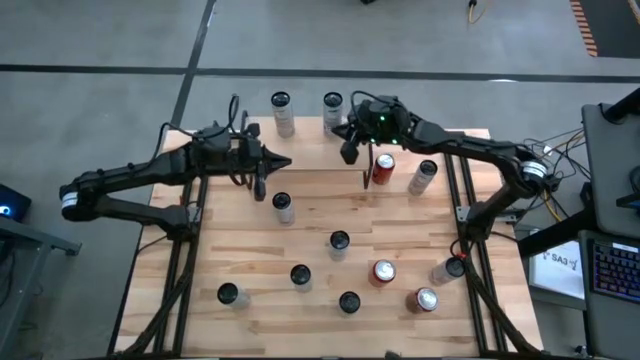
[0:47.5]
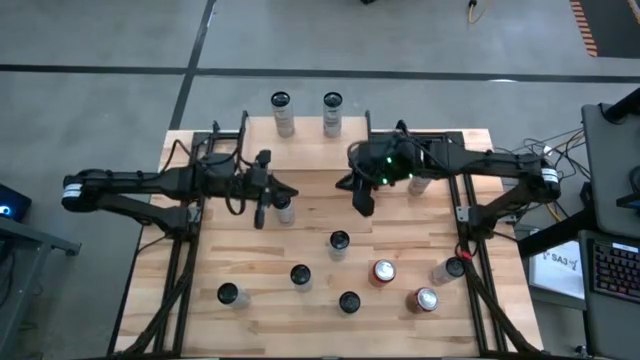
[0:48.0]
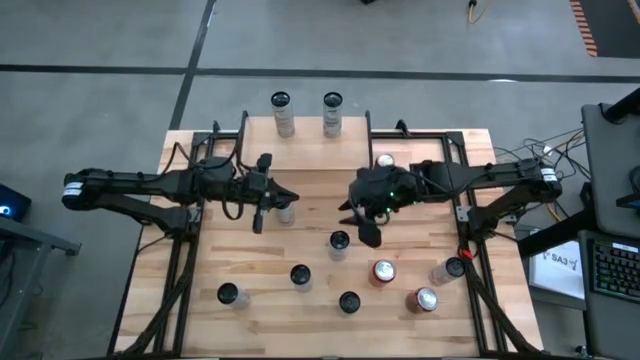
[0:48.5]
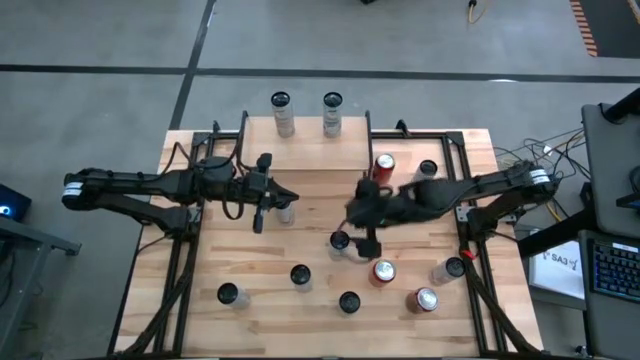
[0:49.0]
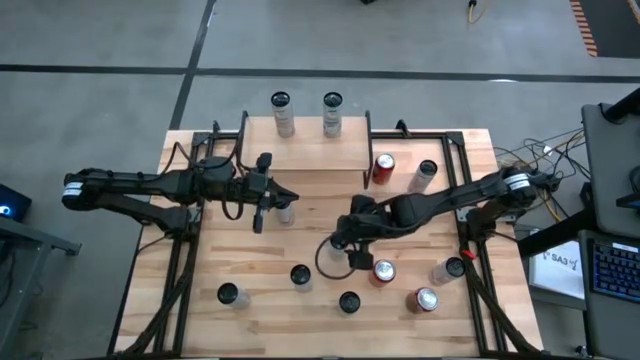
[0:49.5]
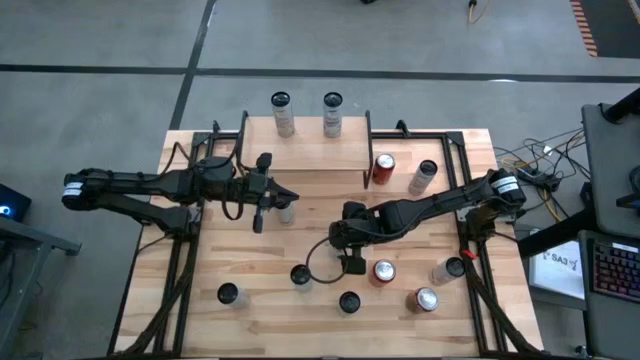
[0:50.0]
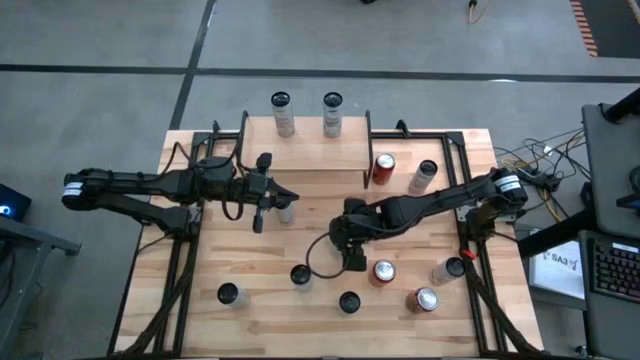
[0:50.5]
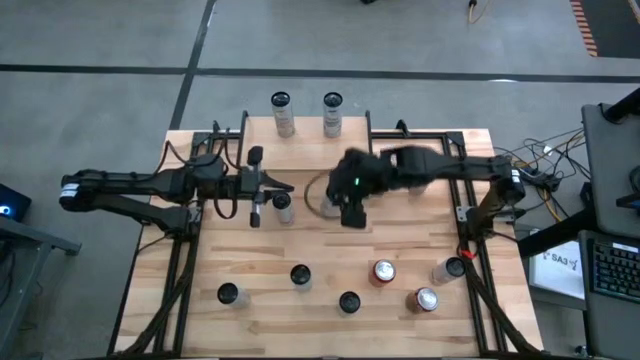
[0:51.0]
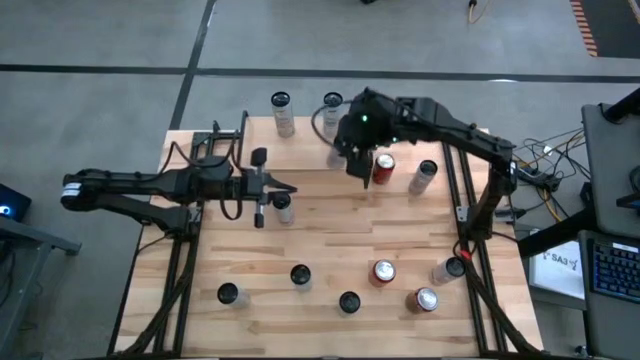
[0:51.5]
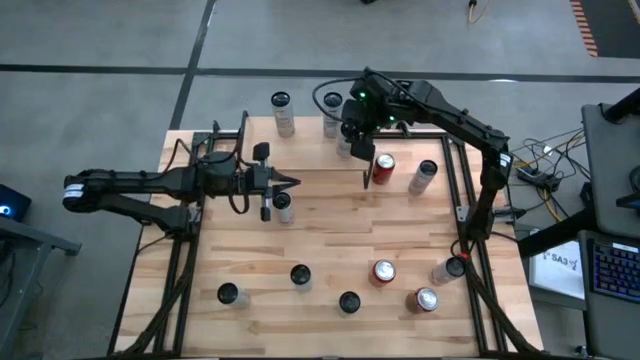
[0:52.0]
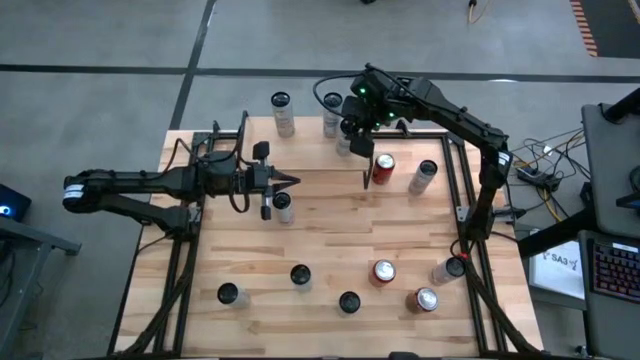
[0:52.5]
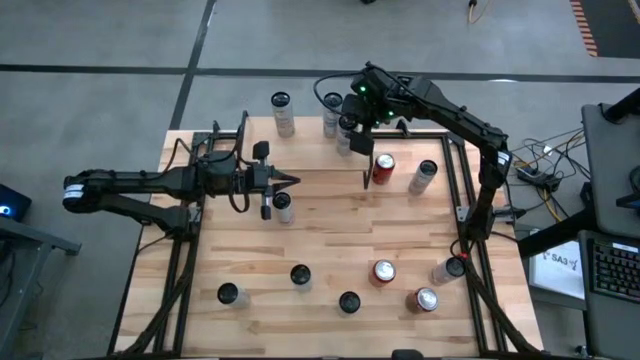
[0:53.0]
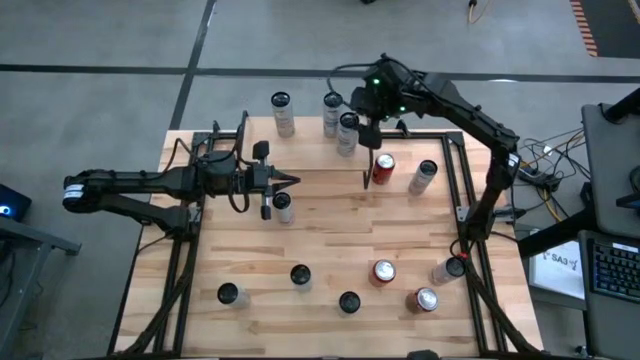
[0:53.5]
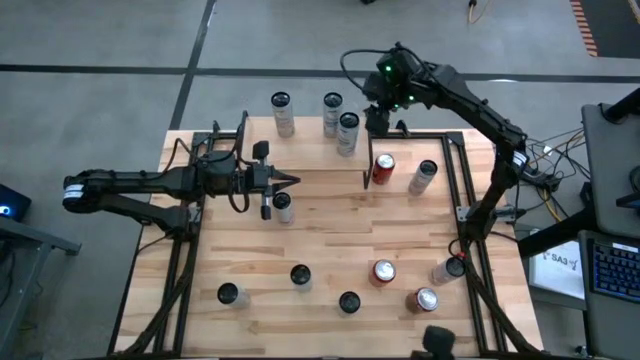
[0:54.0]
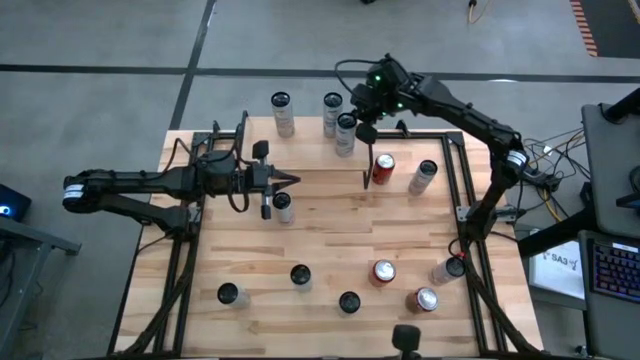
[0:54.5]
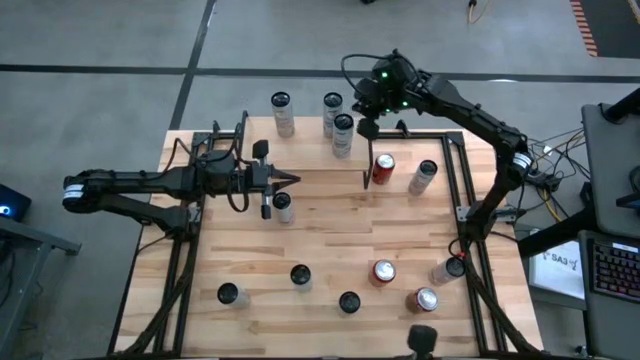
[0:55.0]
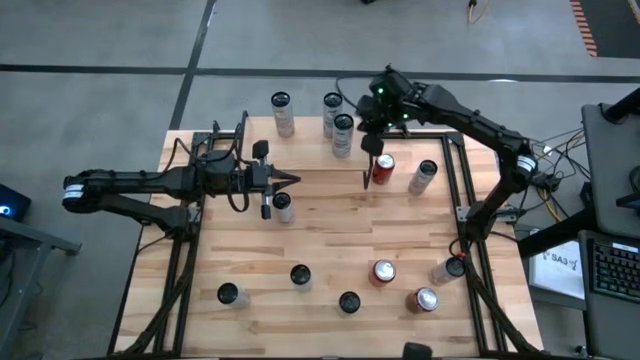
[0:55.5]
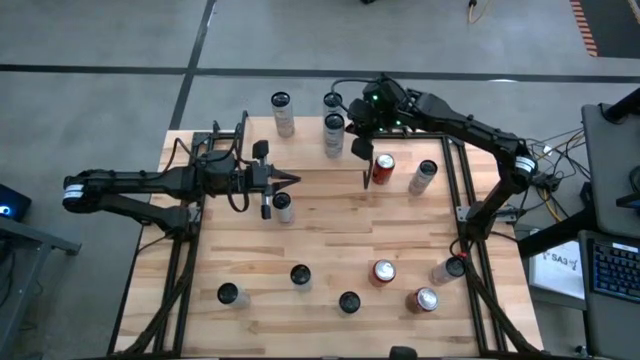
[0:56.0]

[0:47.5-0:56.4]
Task: Place canned beverage on shelf
Put the white soda can aligned with the other white soda can on the shelf

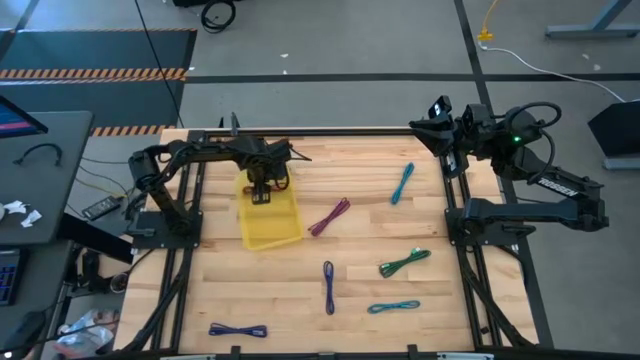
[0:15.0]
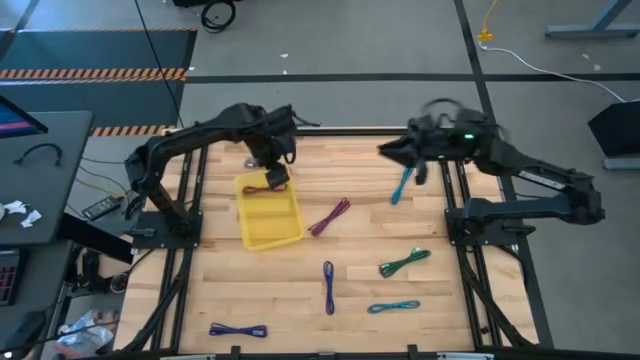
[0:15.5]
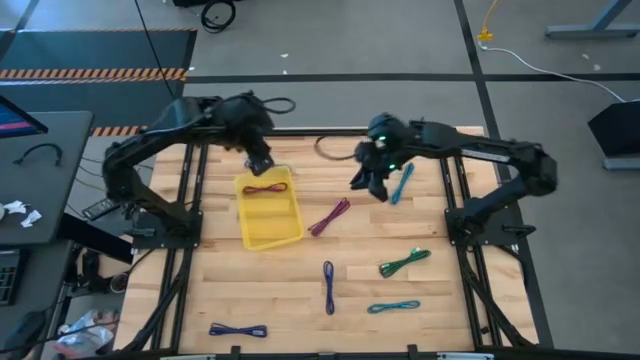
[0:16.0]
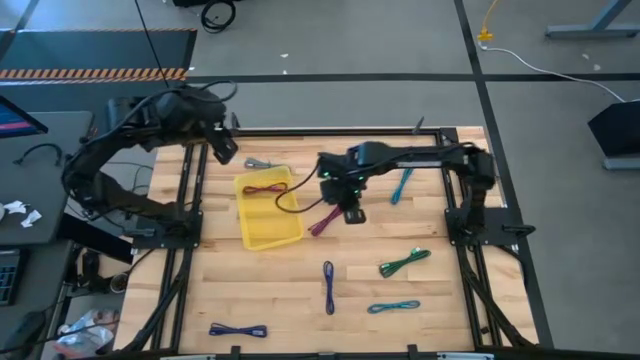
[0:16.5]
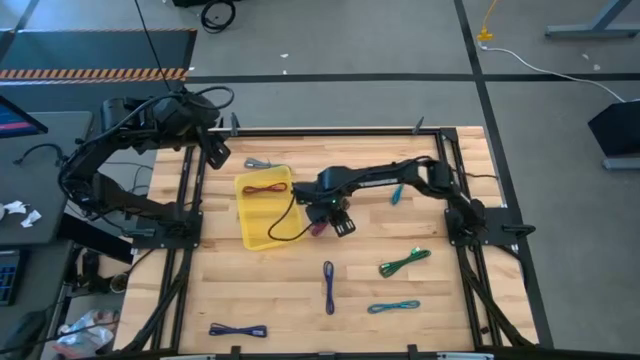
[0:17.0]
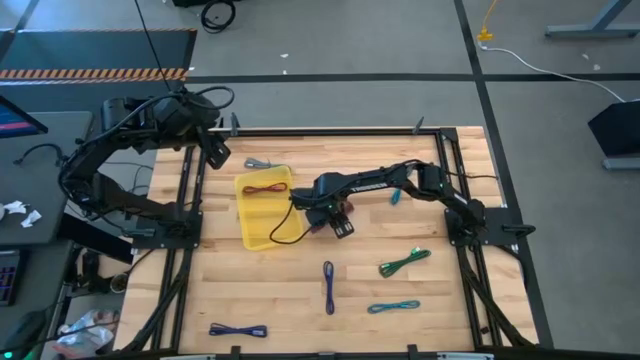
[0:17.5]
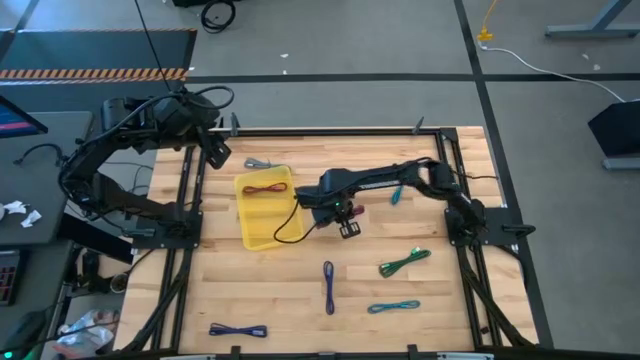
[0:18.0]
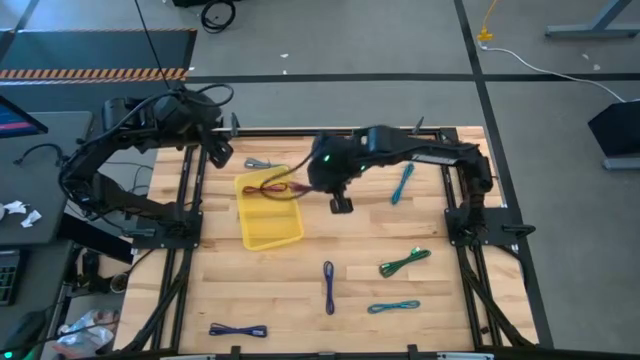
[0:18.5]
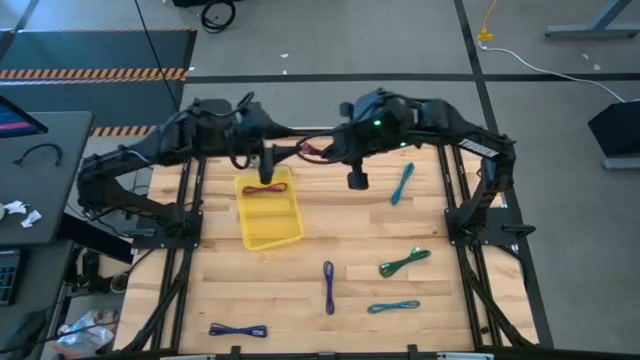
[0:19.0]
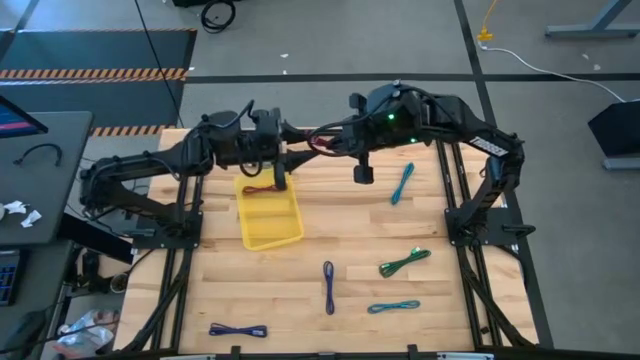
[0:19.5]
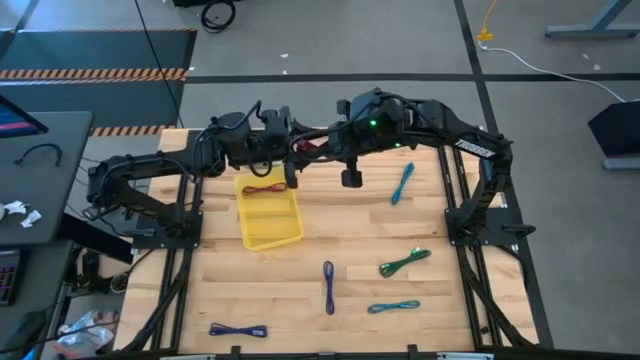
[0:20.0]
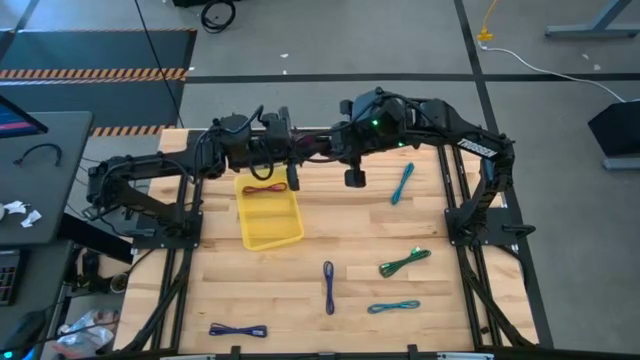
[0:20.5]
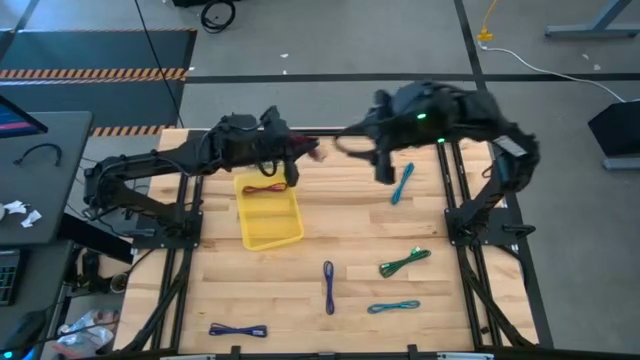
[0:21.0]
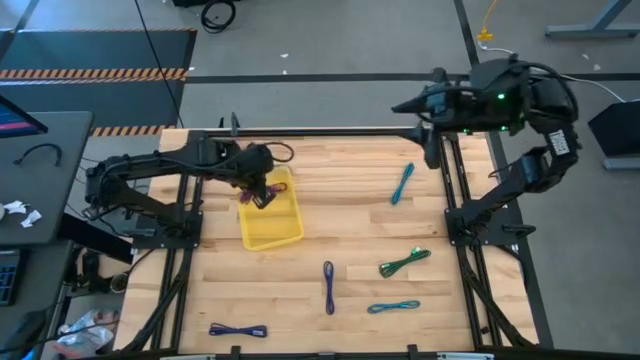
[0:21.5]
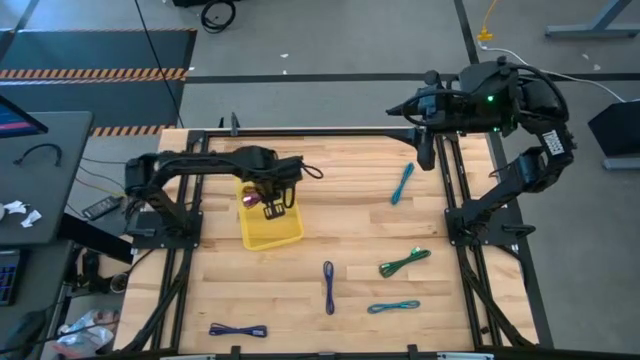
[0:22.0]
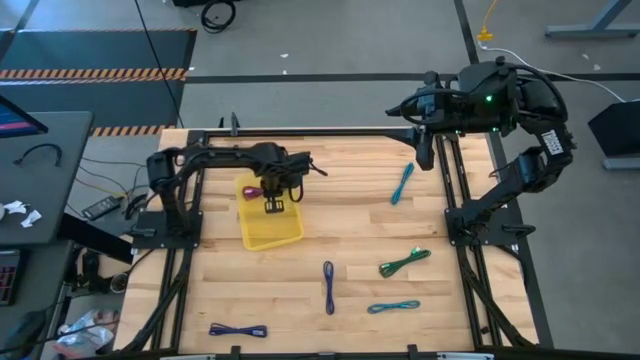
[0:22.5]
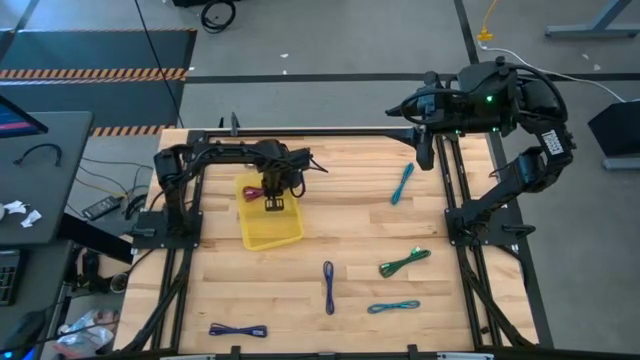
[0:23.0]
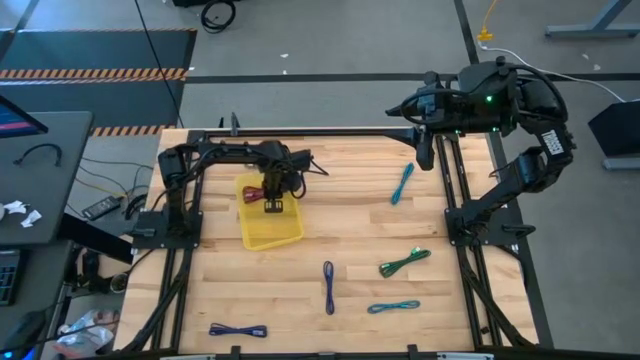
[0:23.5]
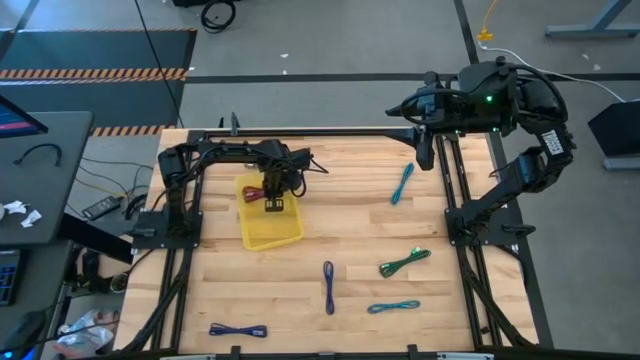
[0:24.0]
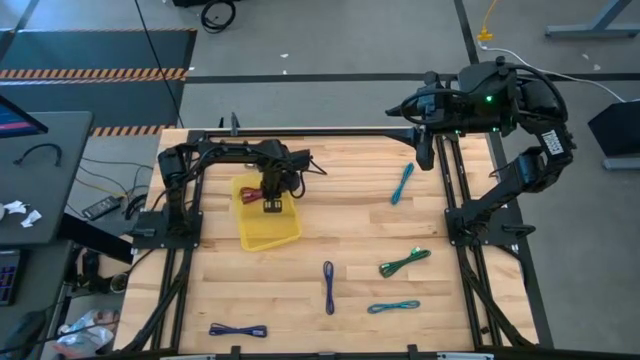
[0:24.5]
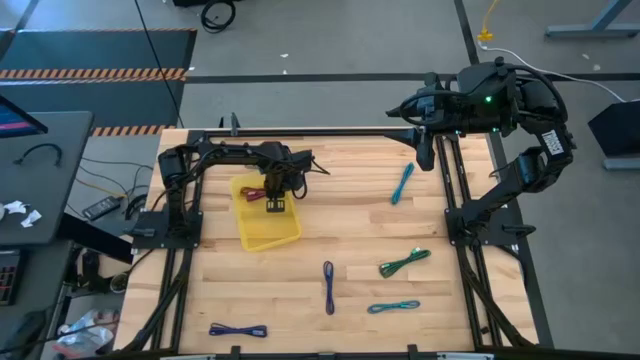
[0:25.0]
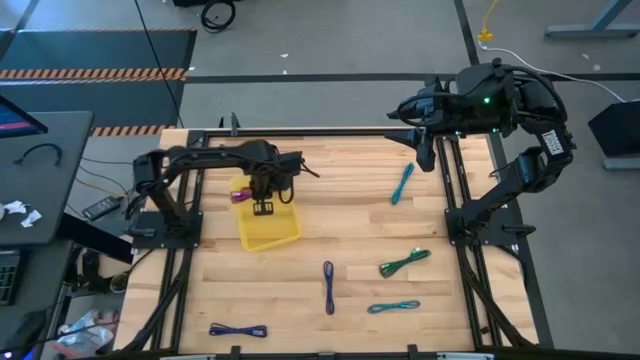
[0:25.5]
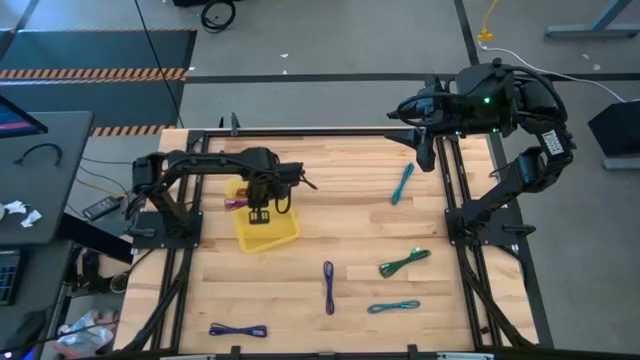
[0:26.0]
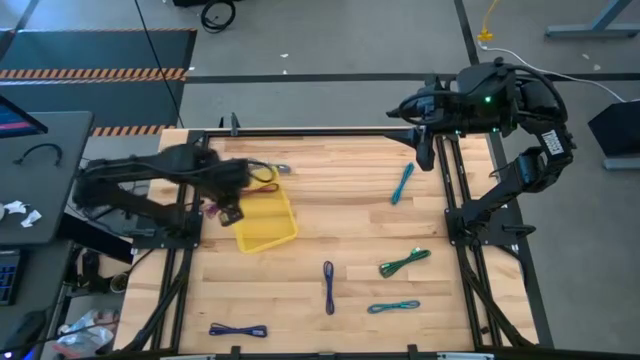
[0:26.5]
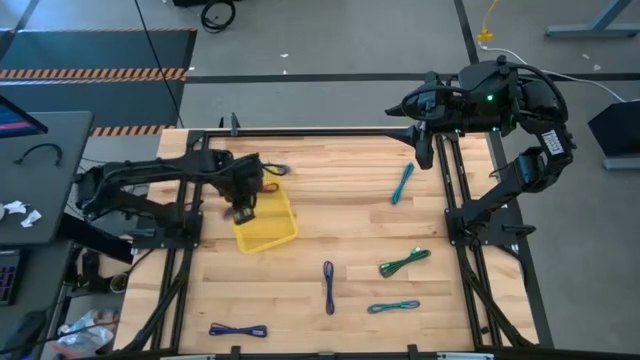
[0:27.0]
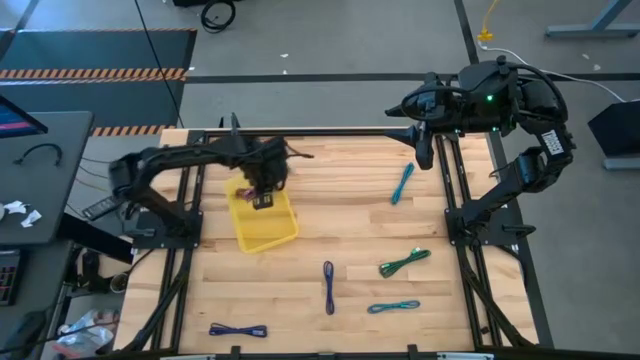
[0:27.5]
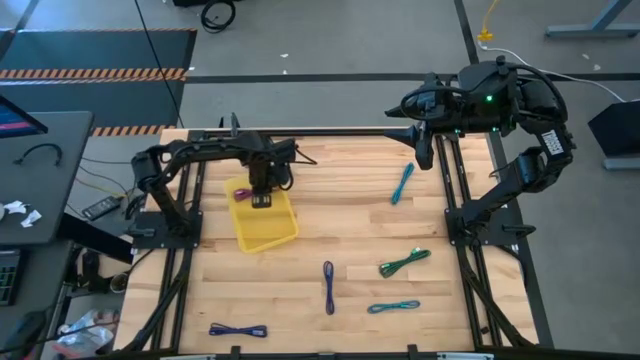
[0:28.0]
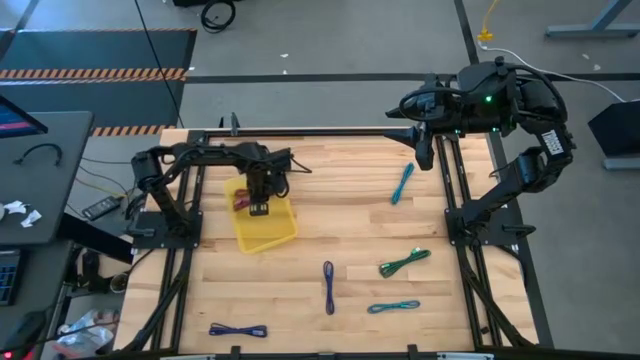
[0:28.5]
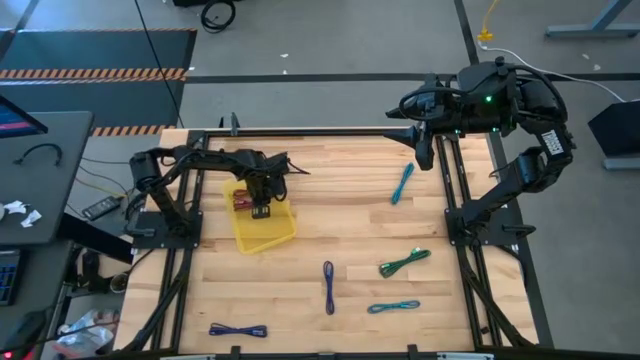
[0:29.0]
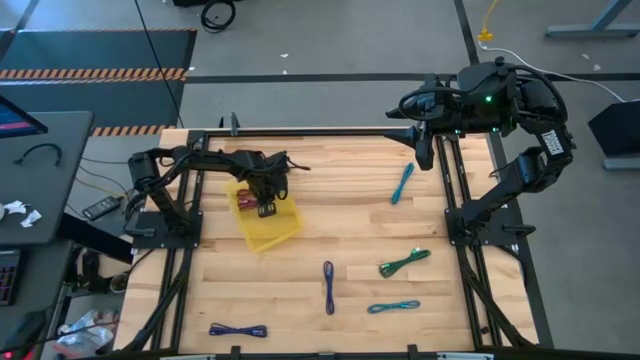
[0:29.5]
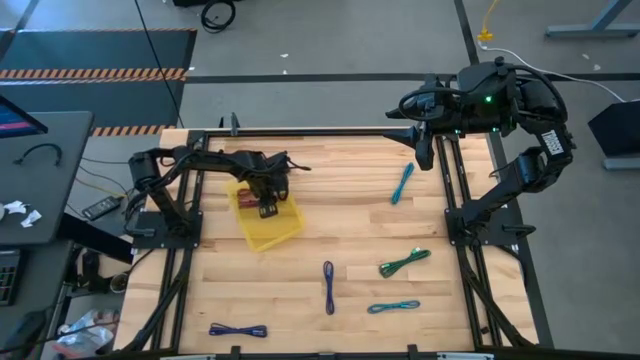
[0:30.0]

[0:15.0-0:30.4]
Task: Pick and place USB-C Cables
Put the pink charger cable into the yellow bin
